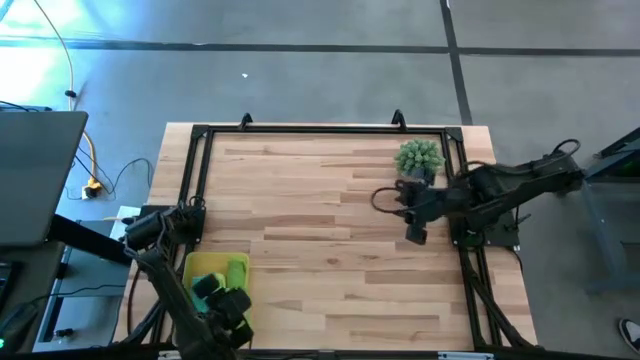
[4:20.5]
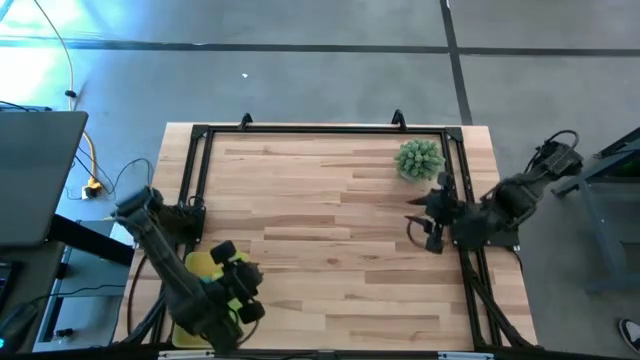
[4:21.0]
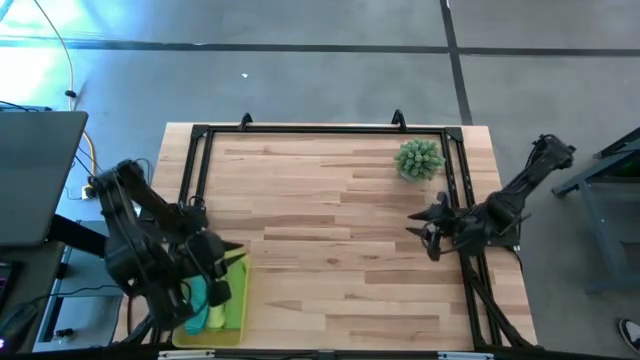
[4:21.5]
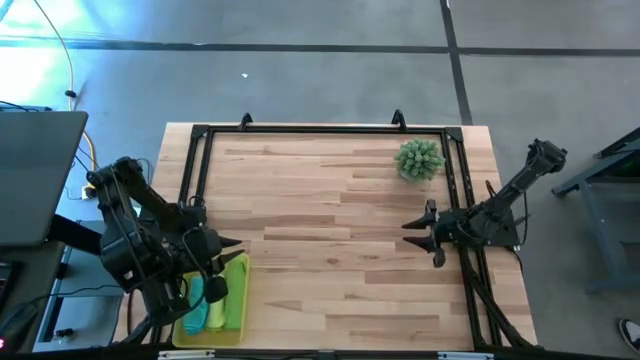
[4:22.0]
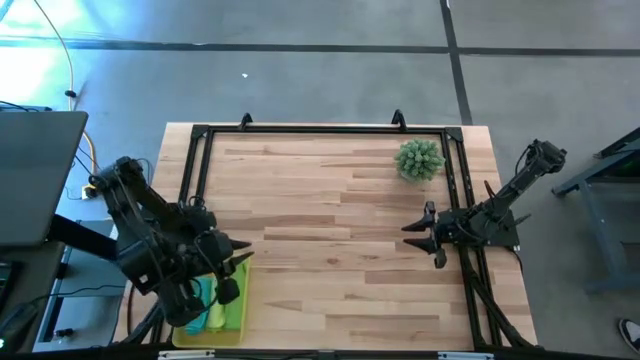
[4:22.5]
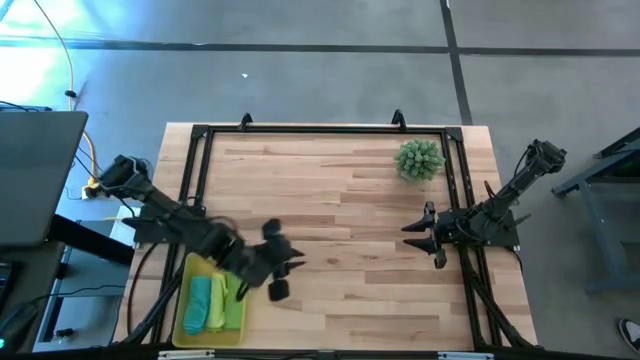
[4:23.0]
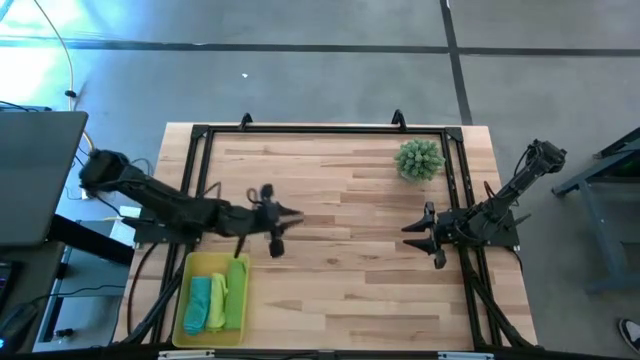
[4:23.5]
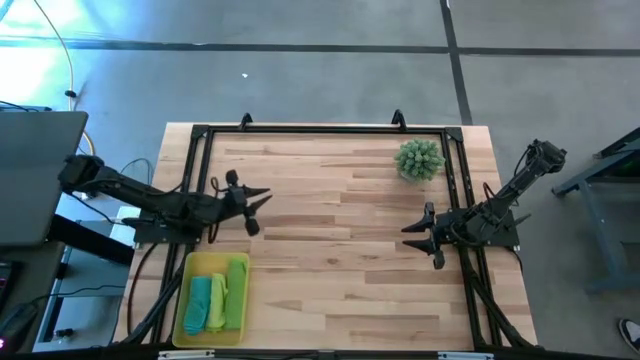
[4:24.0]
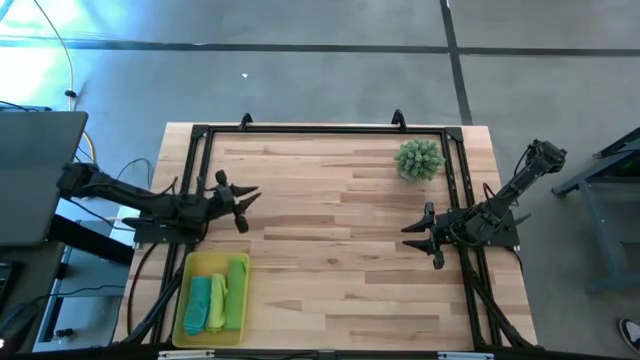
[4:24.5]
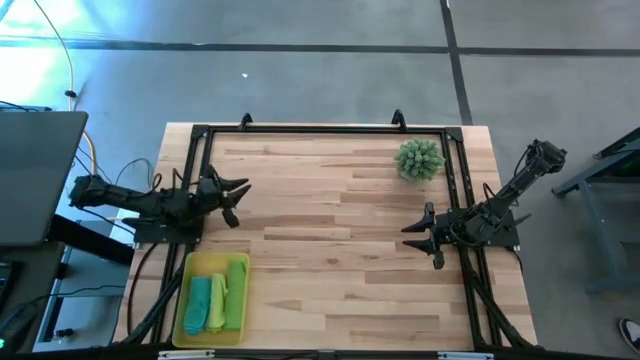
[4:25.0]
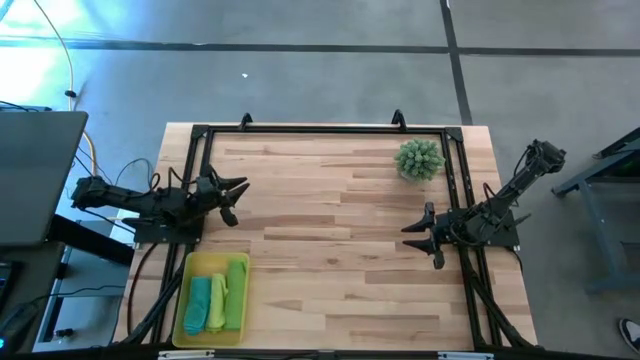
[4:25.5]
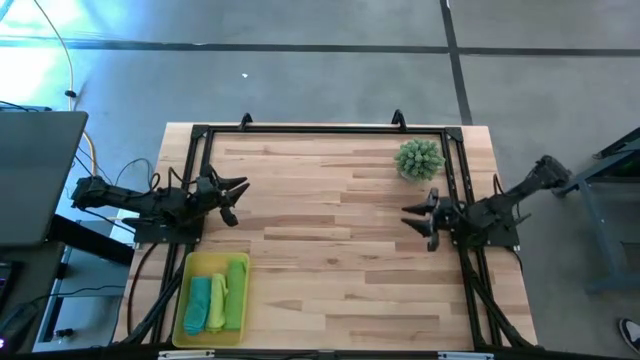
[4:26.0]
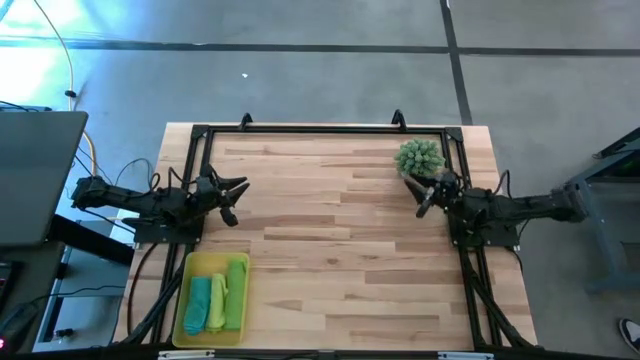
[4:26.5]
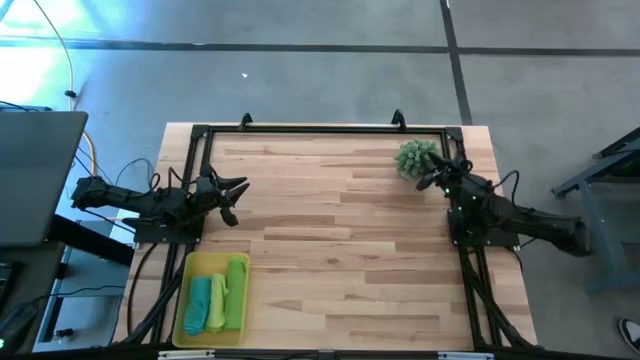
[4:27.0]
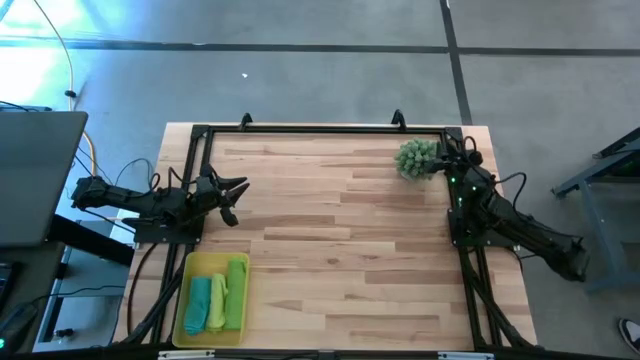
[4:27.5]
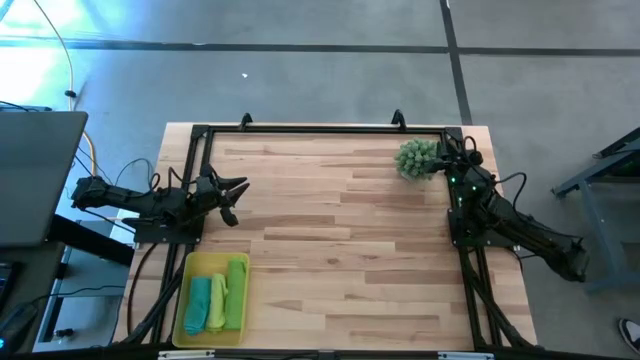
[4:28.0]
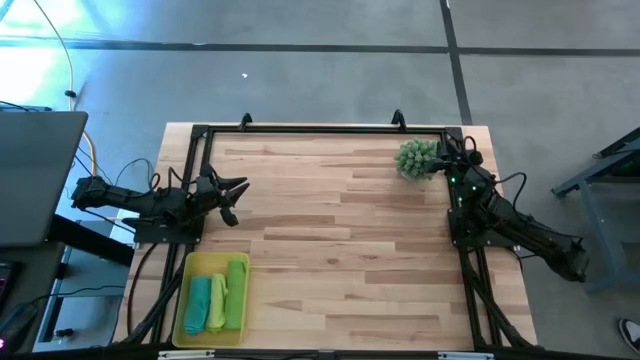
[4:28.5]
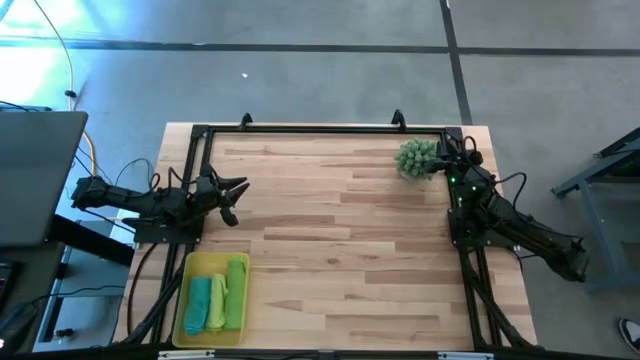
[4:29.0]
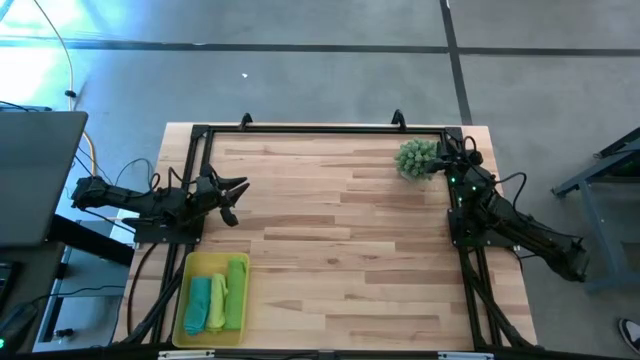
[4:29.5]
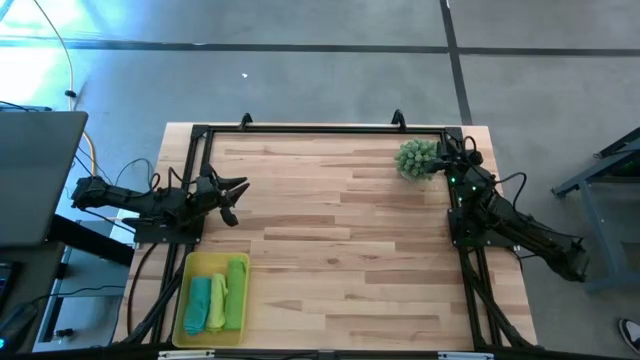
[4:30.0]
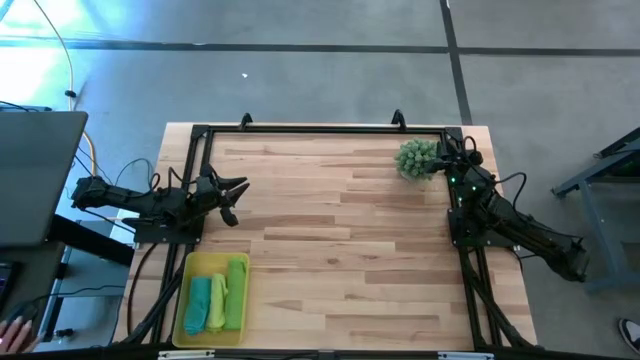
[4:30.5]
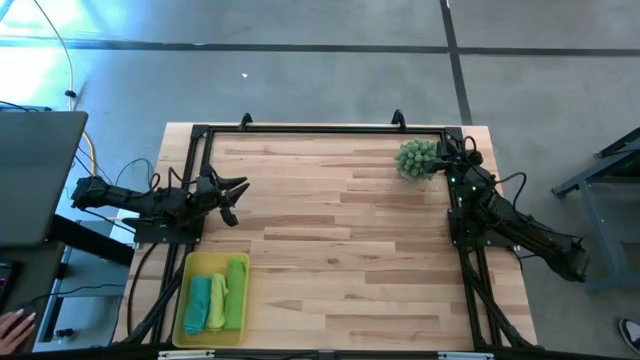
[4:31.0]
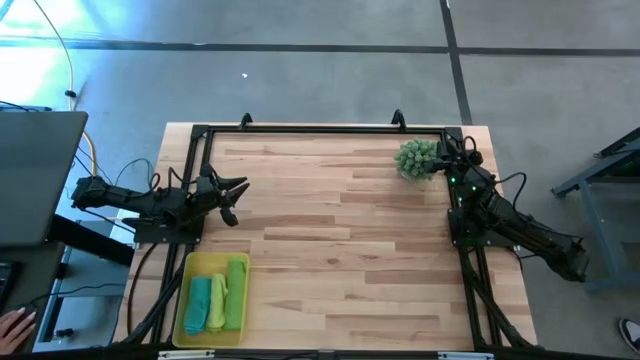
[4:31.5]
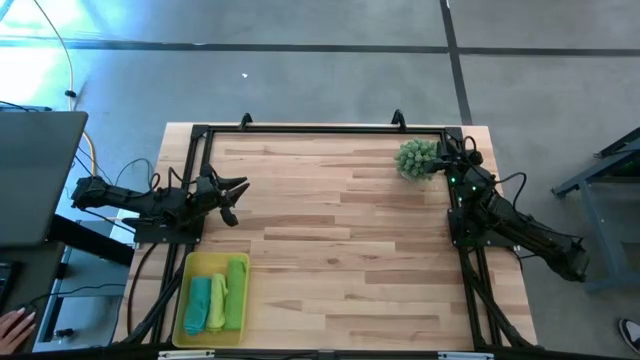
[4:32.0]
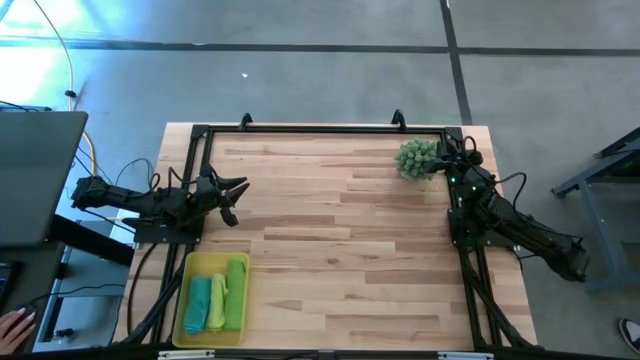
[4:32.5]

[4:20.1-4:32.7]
Task: Roll microfiber towels into tight, uniform cylinder then place into a basket
Return to Home Position

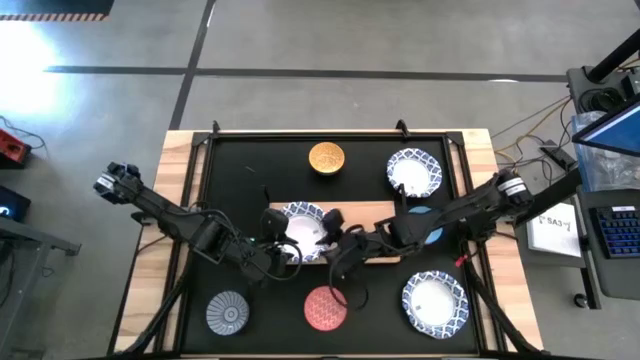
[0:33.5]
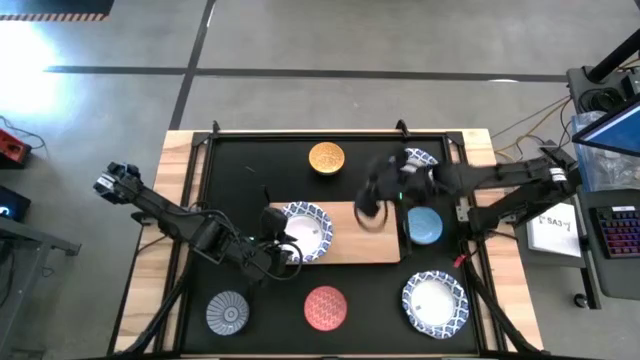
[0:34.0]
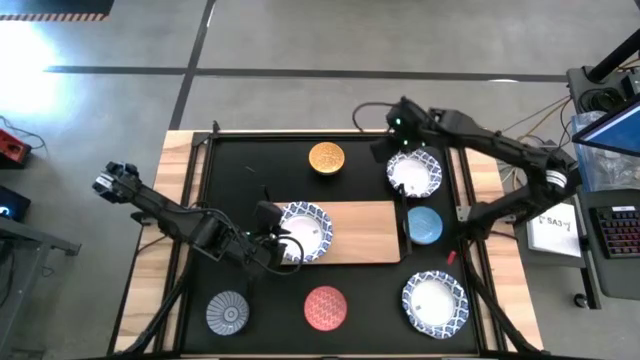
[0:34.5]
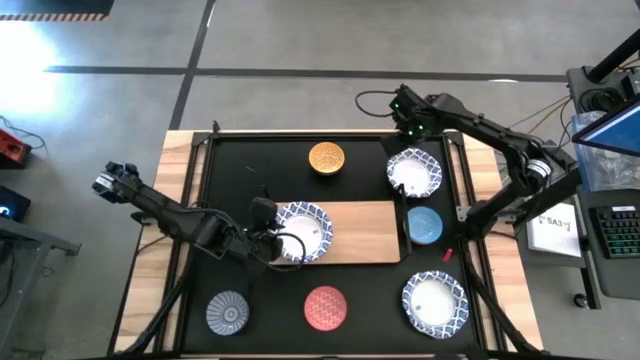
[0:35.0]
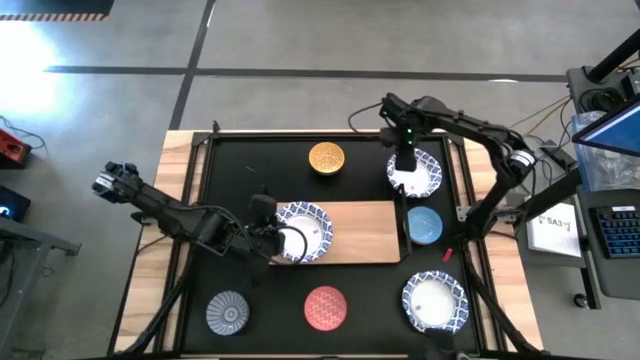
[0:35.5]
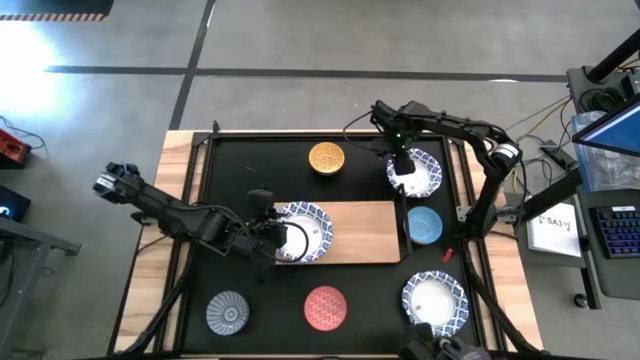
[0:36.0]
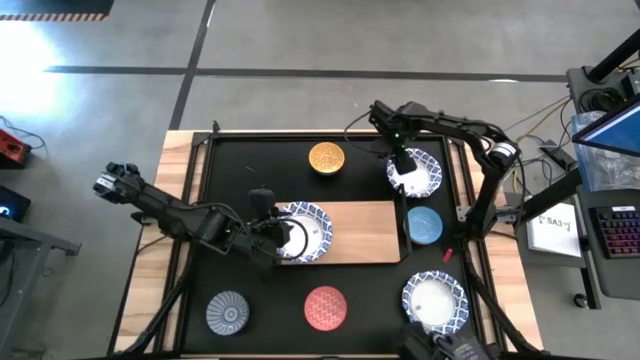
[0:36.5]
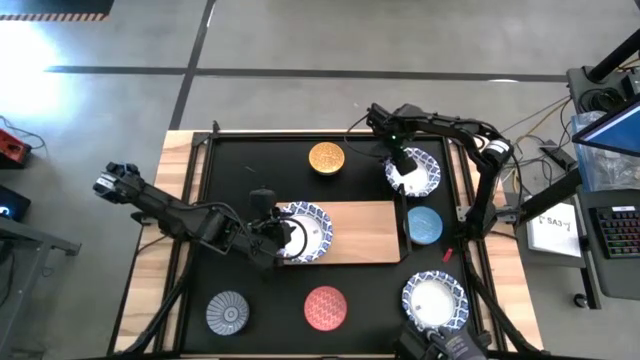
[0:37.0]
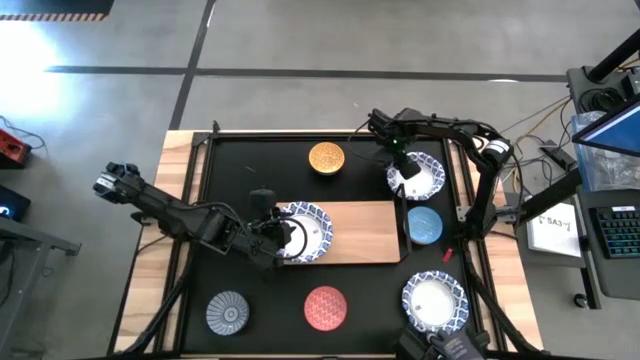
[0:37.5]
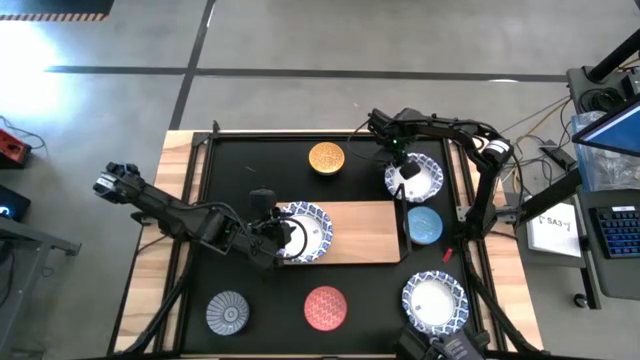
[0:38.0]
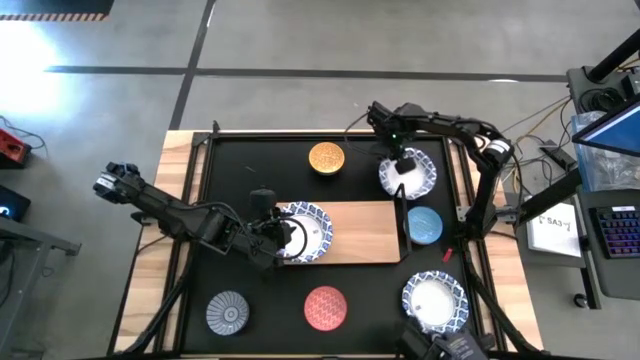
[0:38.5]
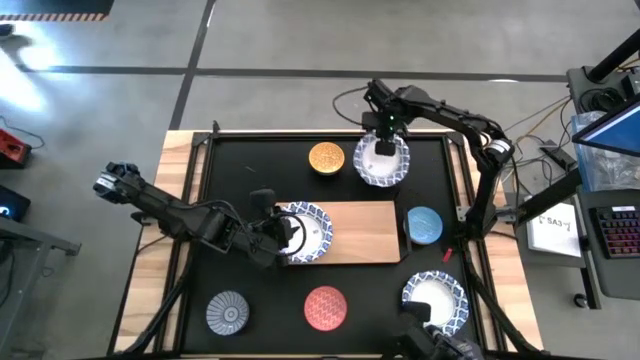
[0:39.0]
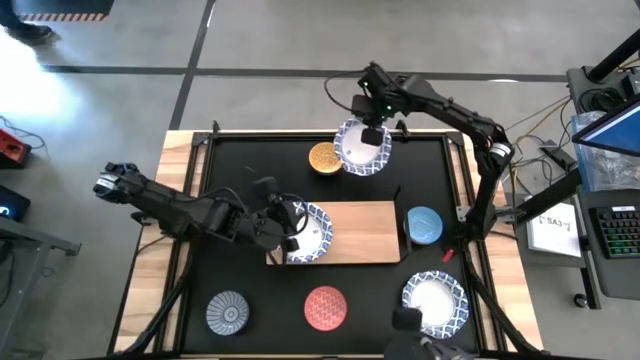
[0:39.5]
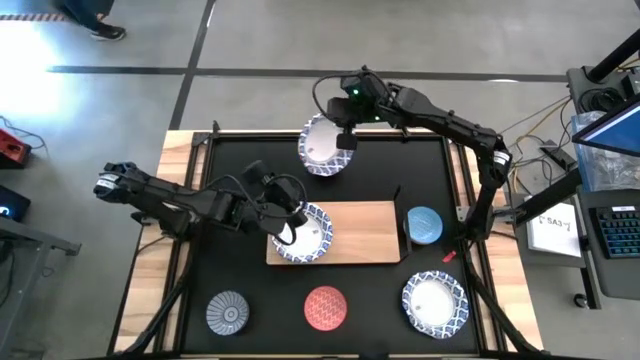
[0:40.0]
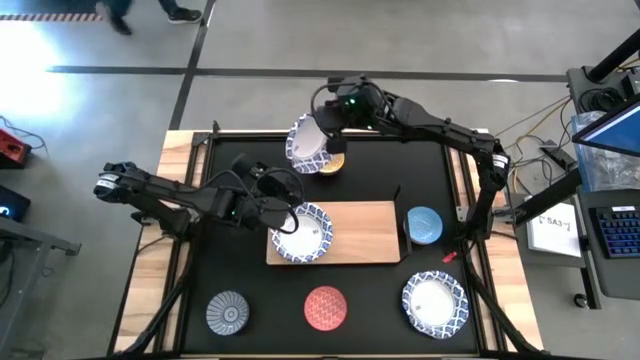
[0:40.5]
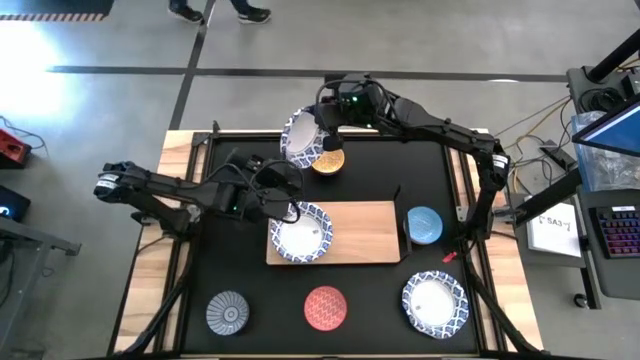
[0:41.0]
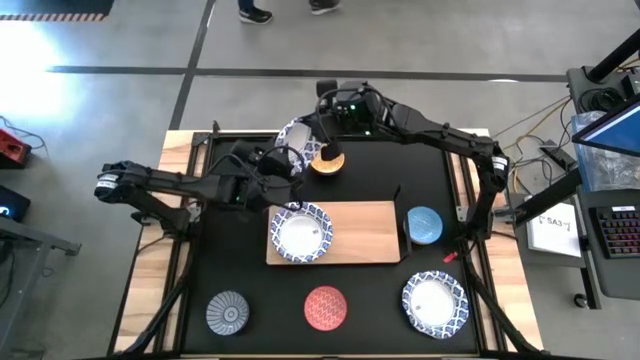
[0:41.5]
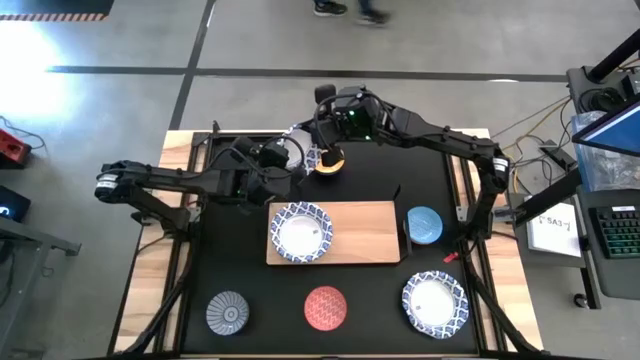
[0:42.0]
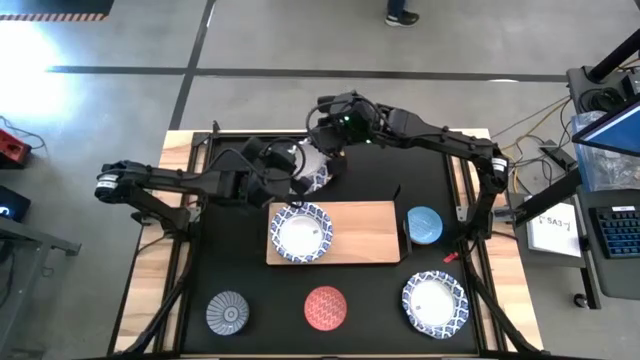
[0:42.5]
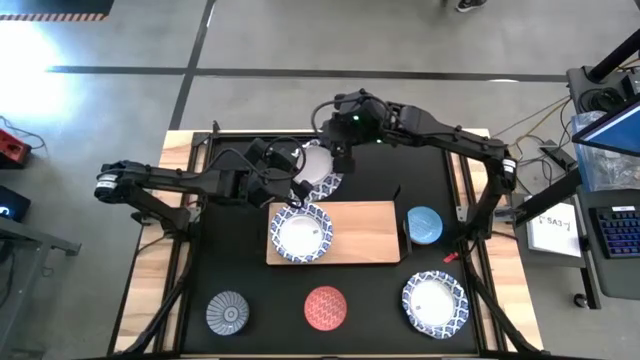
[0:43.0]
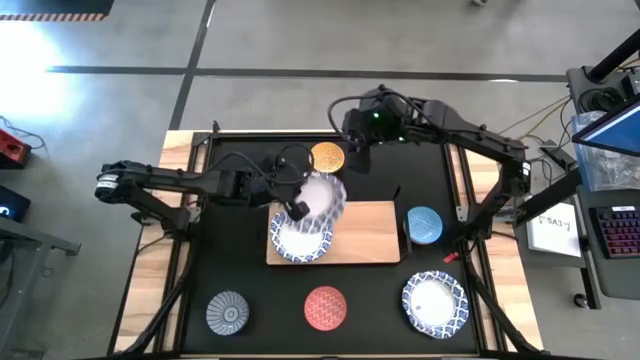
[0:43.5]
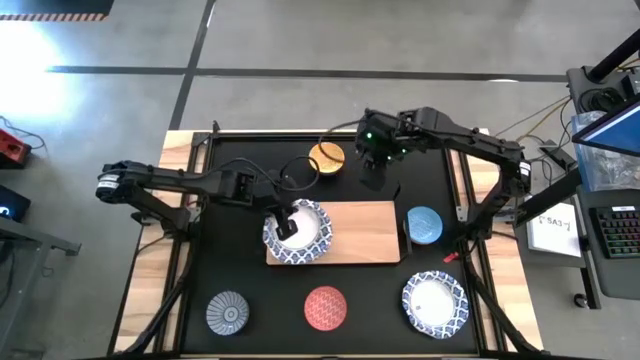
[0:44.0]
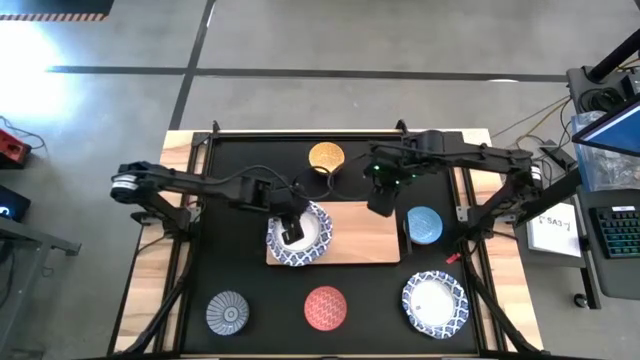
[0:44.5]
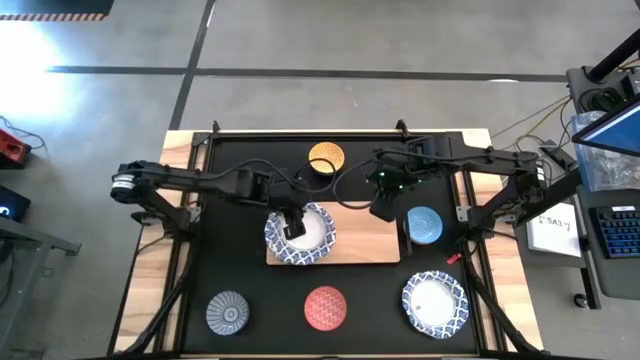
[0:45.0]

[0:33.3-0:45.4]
Task: Place and stack bowls onto a shelf
Stack the top white patterned bowl on top of the other white patterned bowls on the shelf
